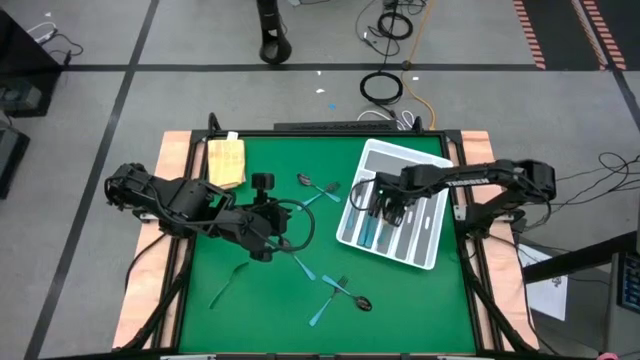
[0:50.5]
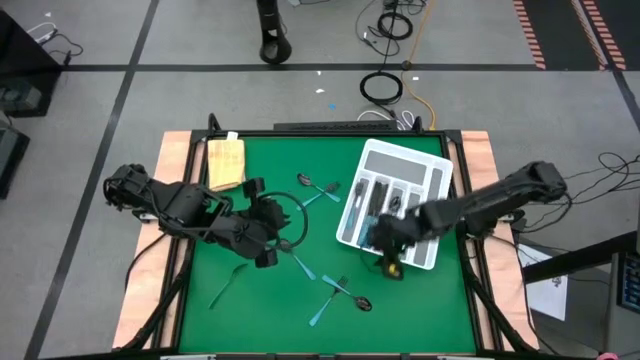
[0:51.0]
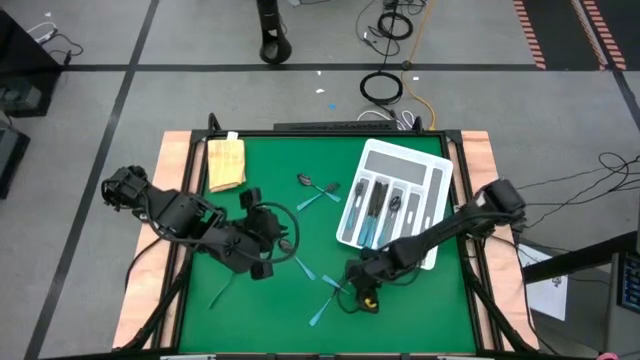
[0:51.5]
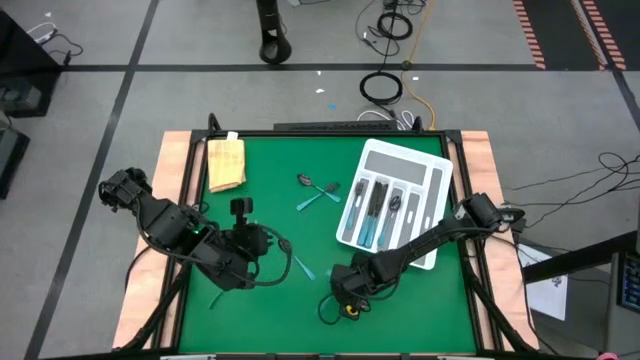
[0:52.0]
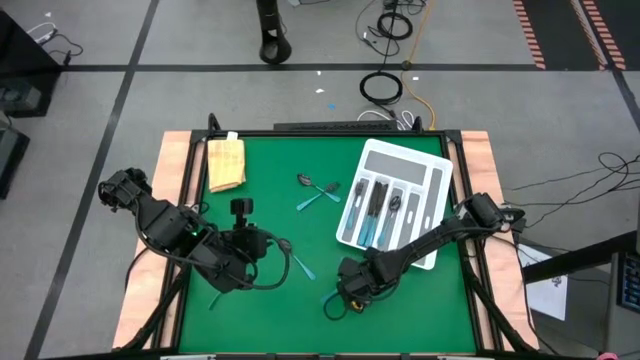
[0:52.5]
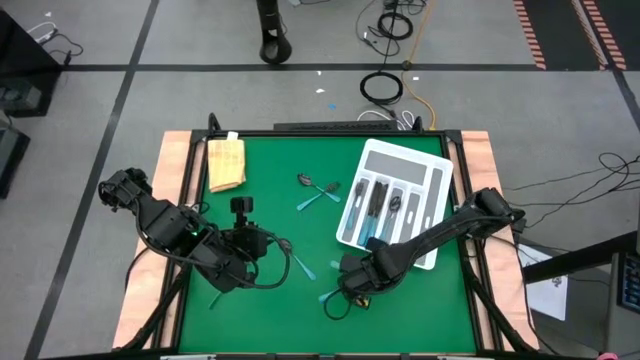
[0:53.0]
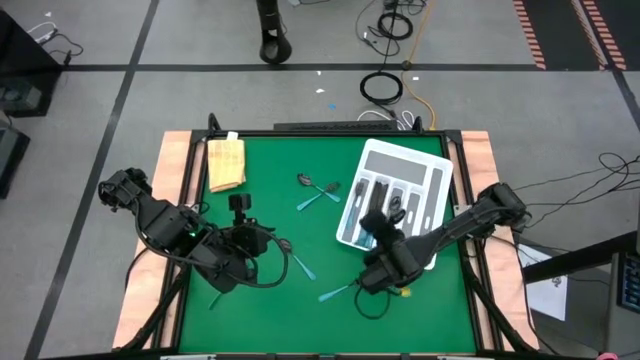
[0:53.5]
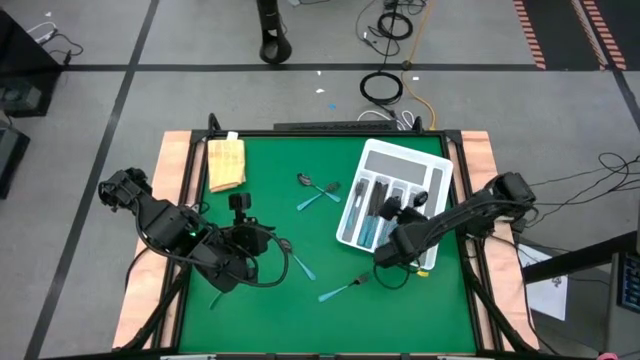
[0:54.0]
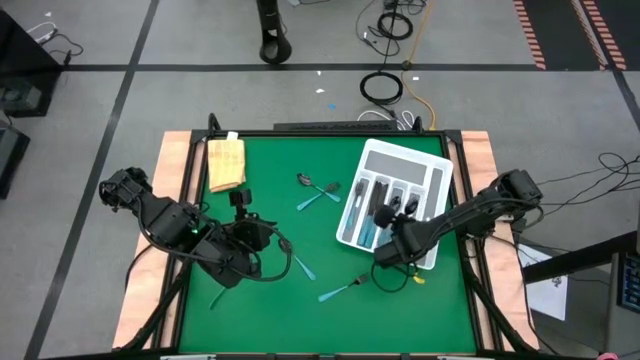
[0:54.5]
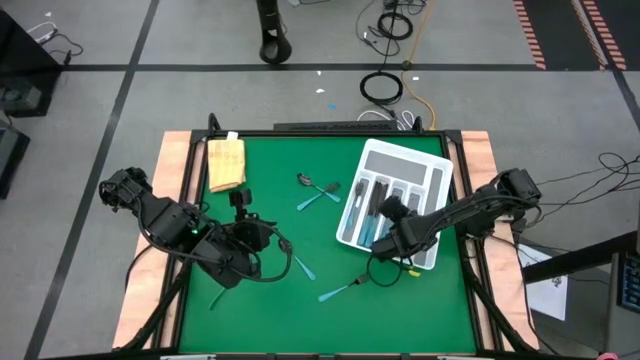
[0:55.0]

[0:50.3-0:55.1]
Task: Sort silverware
Put the blue spoon into the white cutlery tray

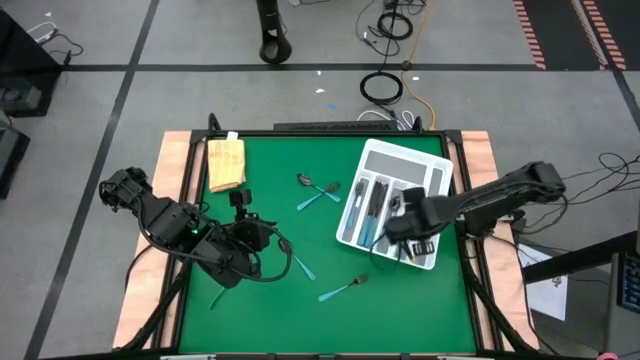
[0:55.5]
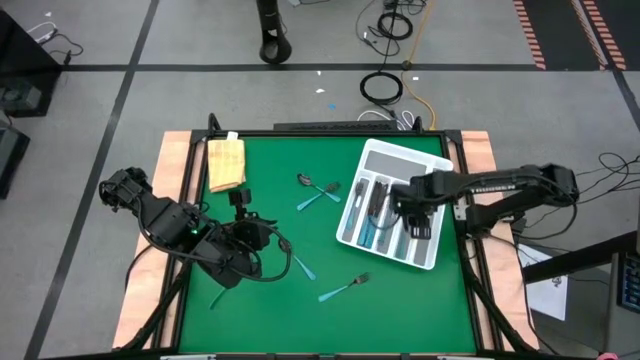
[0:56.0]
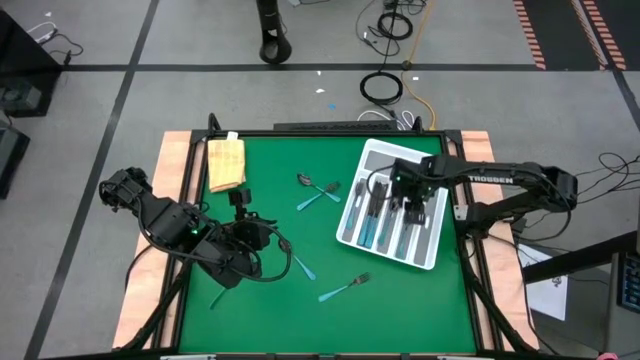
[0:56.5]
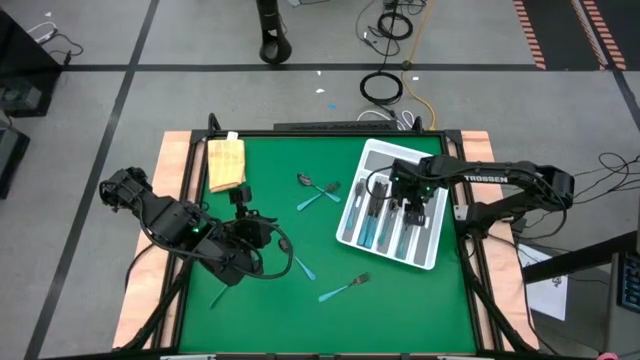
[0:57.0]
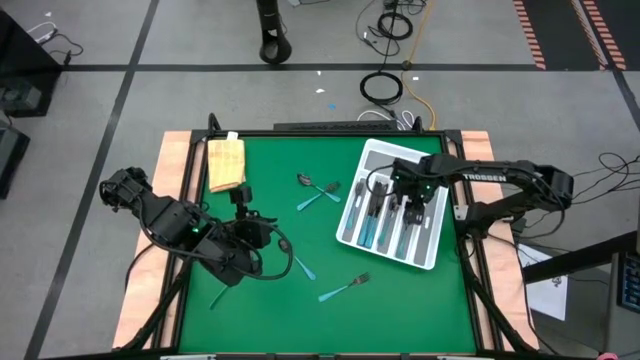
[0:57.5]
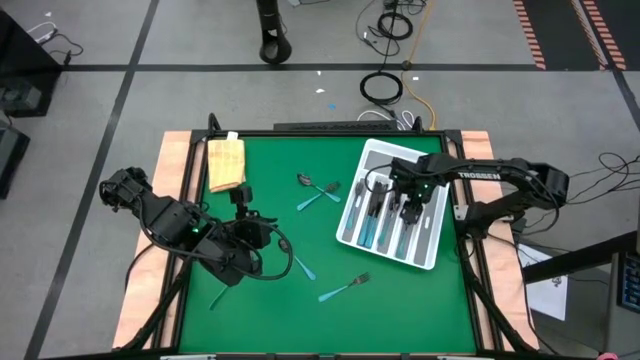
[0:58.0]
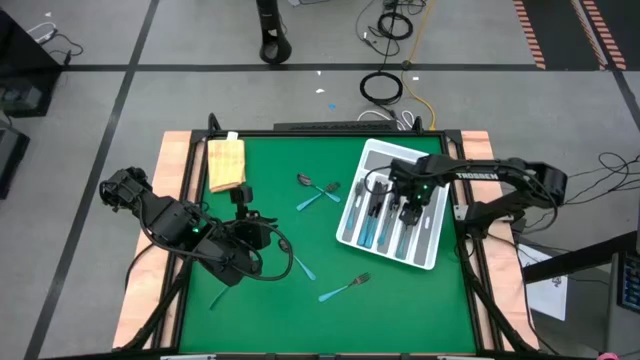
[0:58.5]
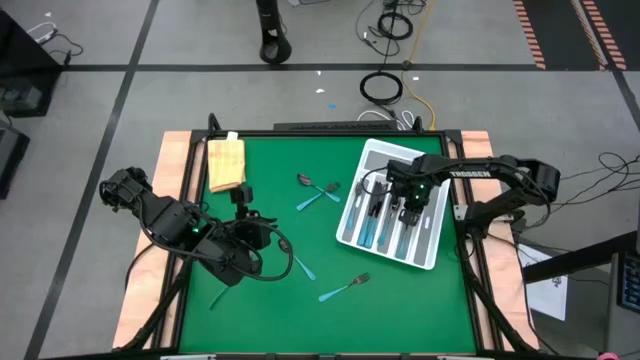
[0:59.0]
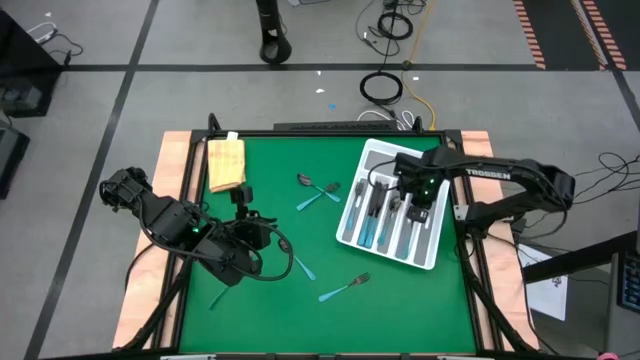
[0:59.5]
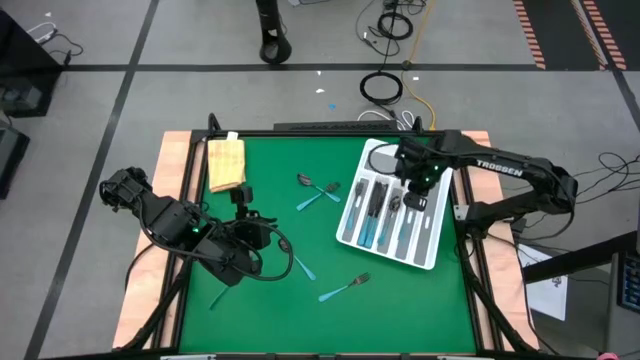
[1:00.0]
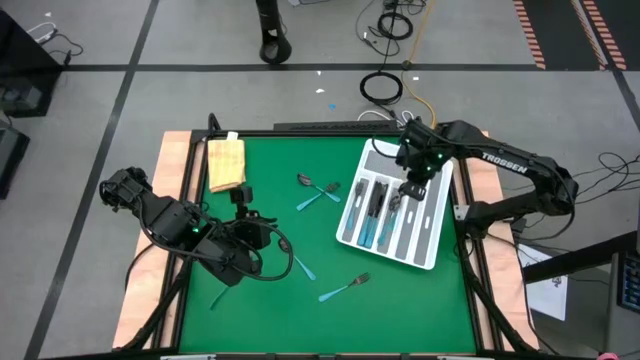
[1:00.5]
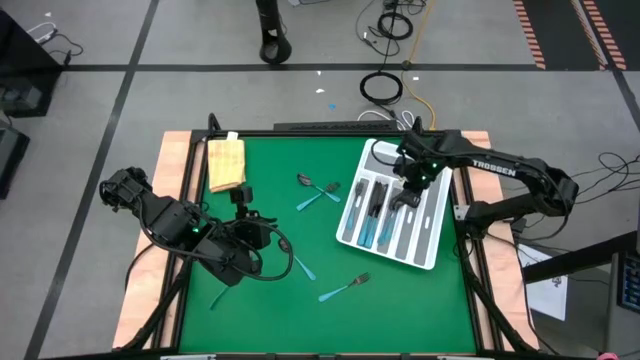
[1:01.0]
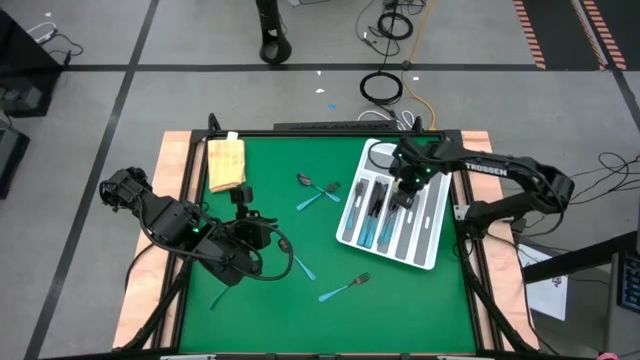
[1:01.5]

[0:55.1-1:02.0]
Put the blue spoon into the white cutlery tray

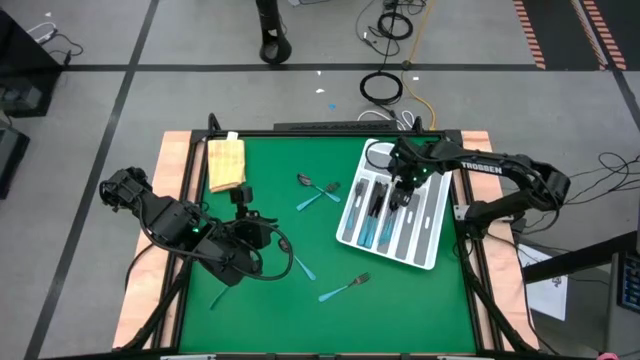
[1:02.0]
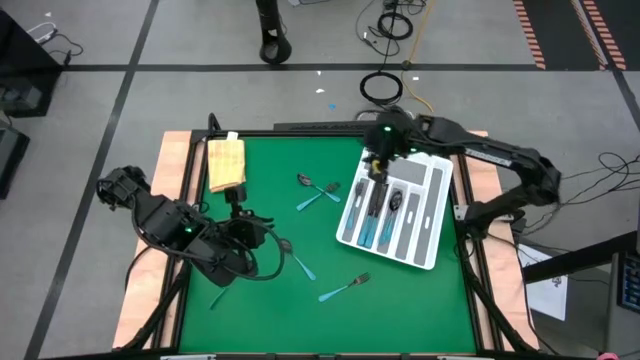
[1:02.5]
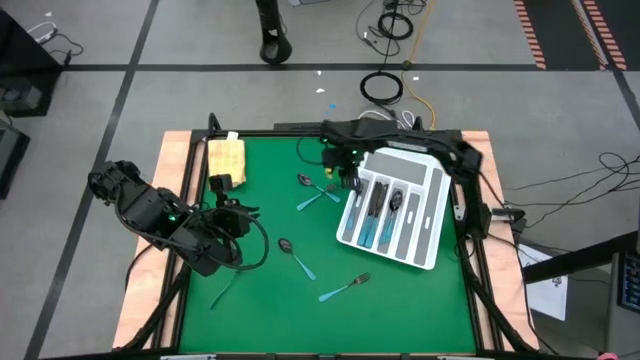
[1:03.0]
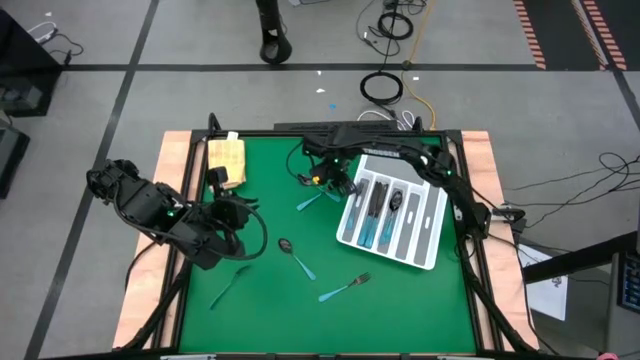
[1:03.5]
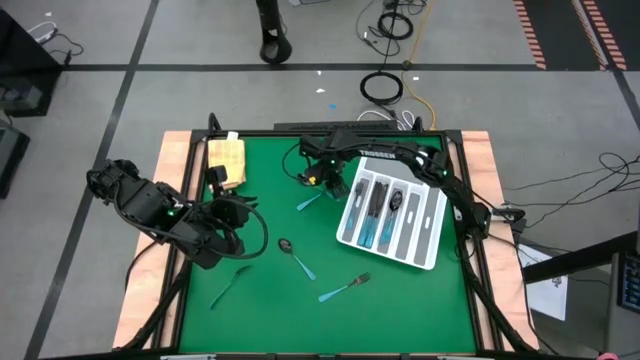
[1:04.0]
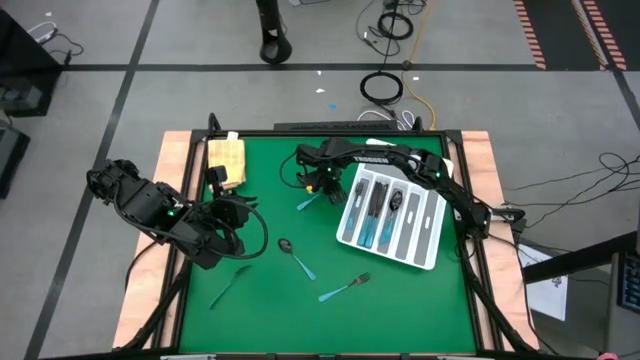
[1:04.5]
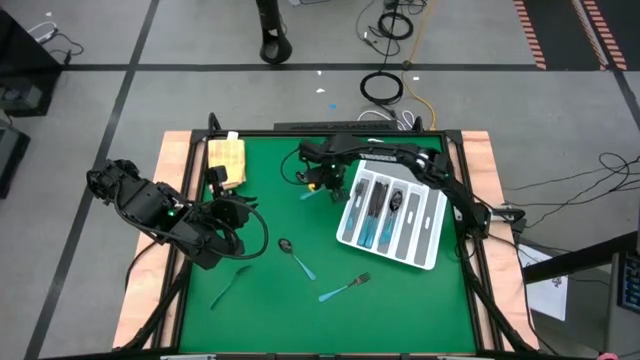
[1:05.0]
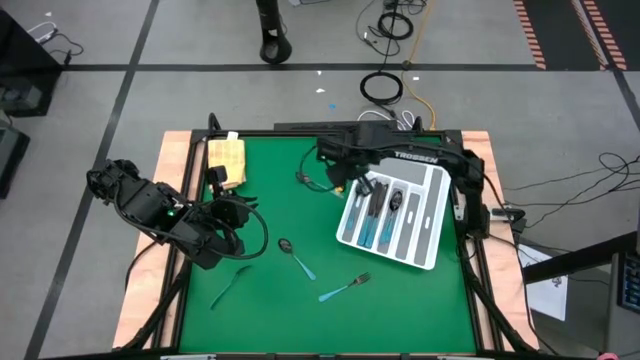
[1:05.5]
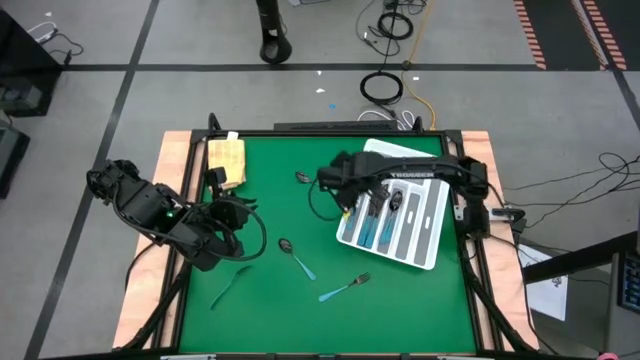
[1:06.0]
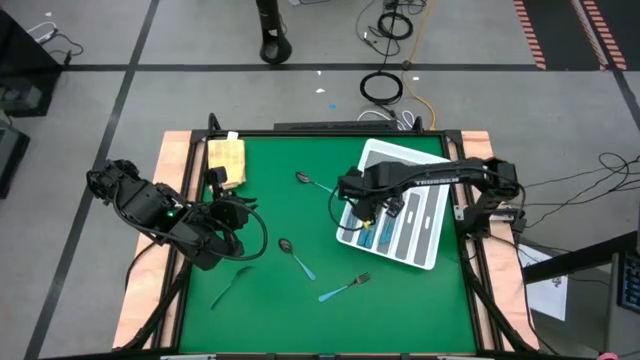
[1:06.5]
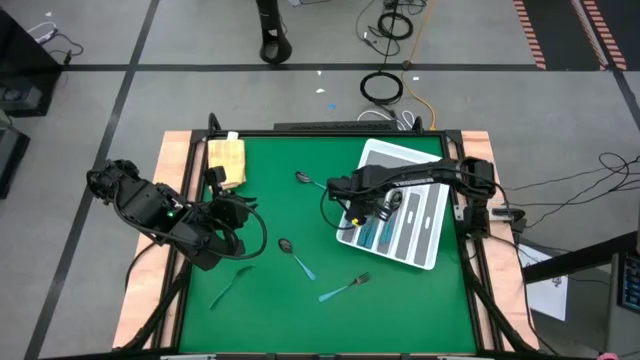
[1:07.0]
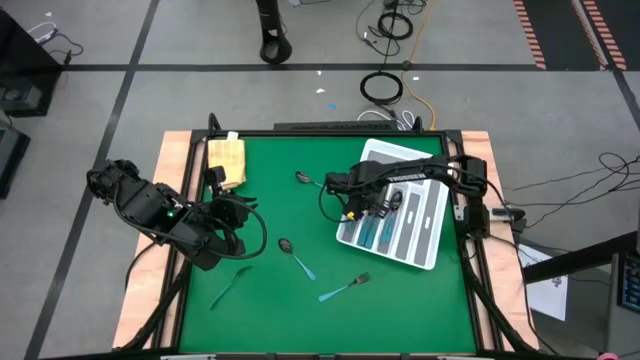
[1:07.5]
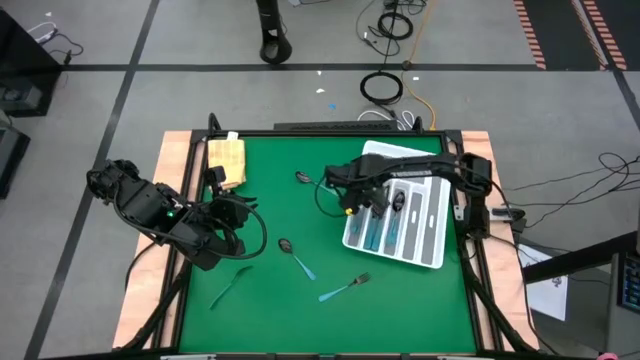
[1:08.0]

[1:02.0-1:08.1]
Put the blue fork into the white cutlery tray

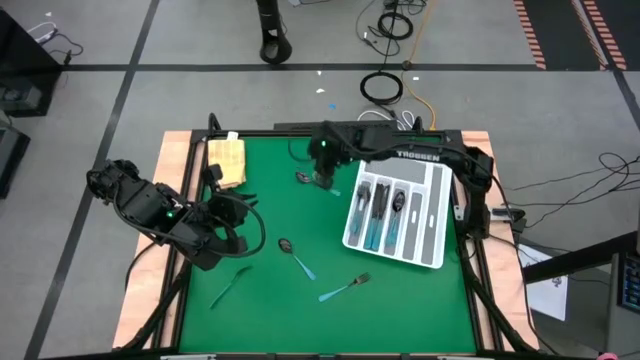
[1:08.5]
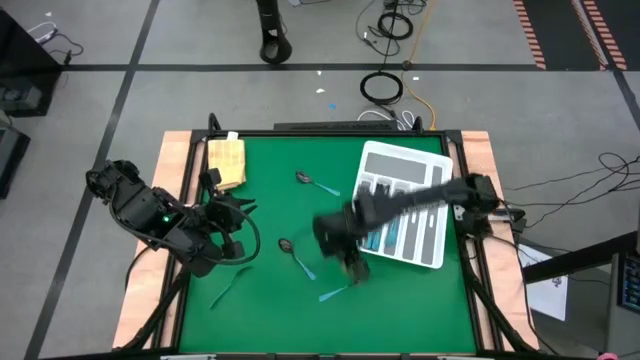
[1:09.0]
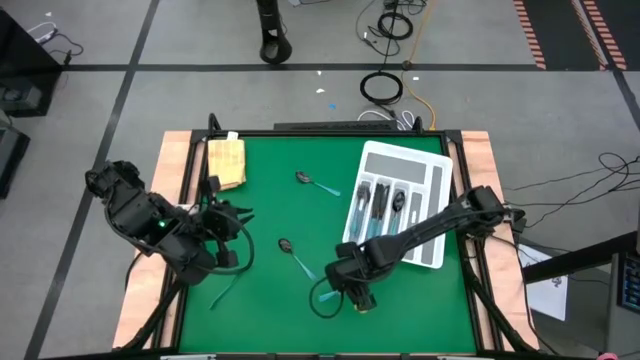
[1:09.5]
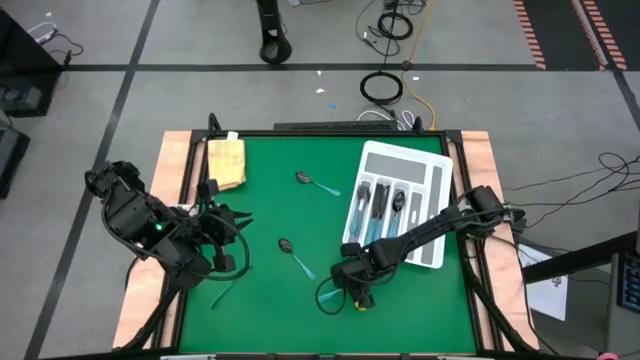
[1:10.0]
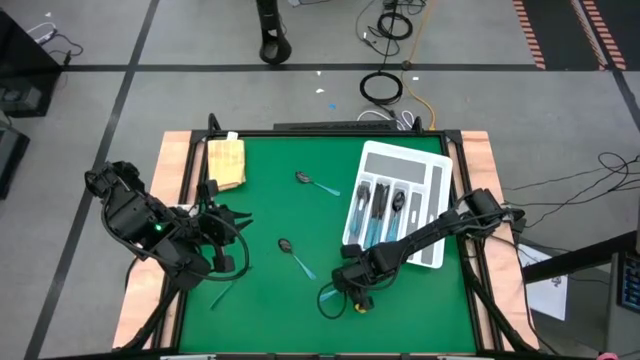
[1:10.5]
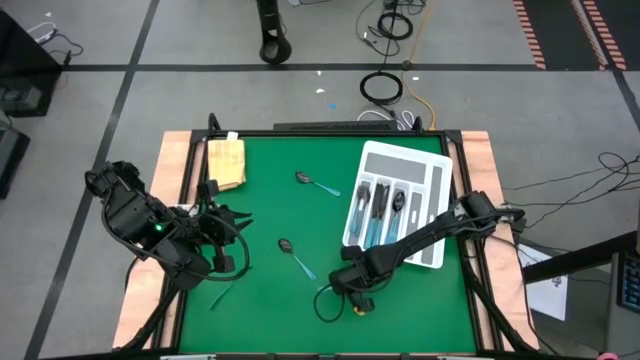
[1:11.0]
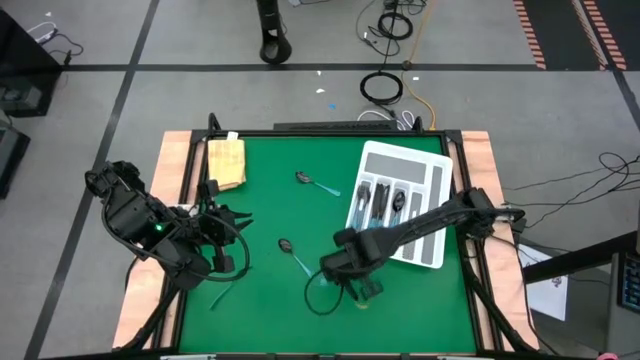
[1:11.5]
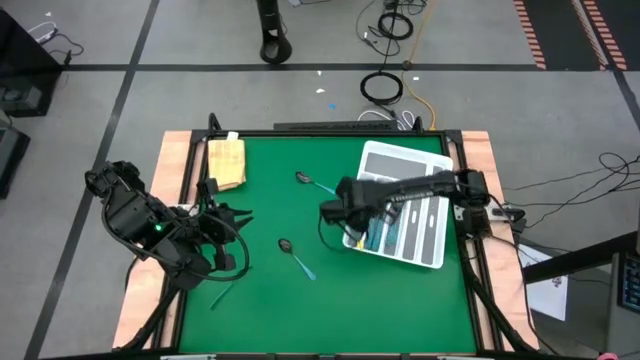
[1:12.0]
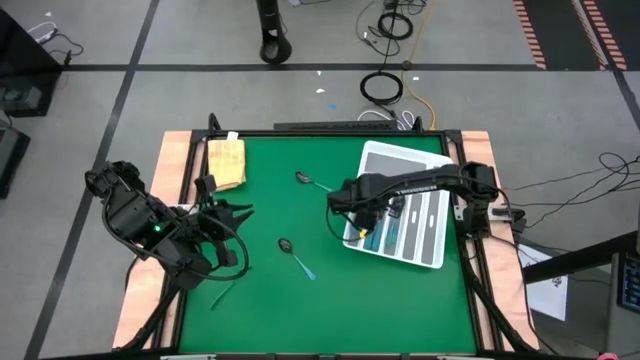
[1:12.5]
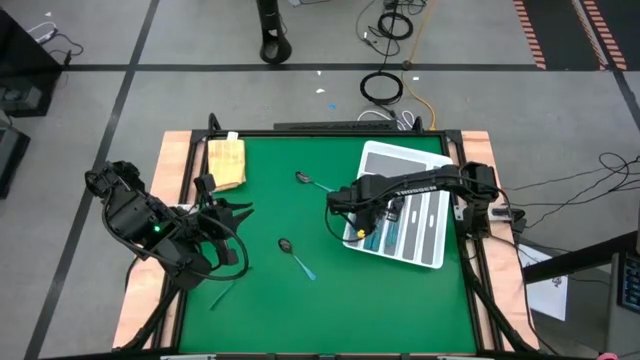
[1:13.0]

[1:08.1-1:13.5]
Put the blue fork into the white cutlery tray
